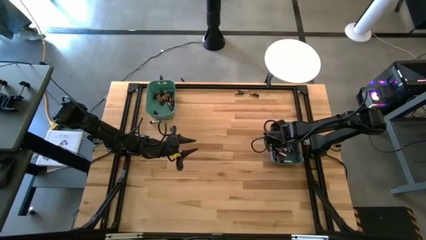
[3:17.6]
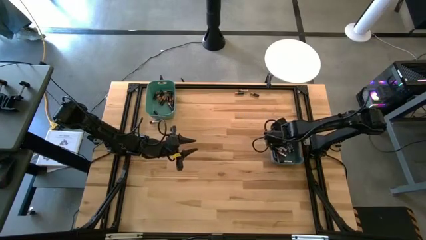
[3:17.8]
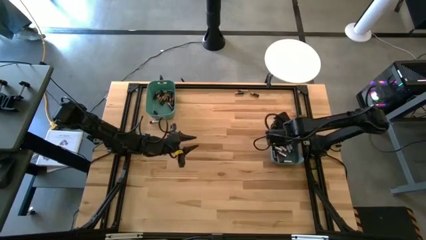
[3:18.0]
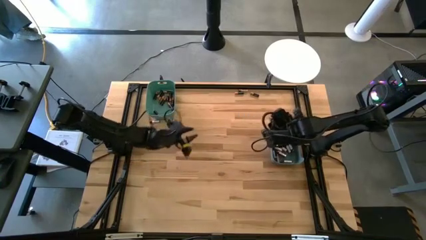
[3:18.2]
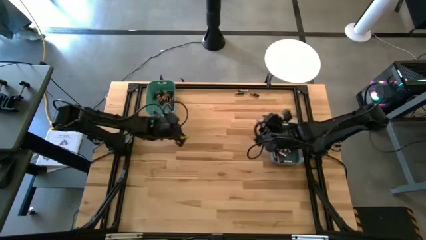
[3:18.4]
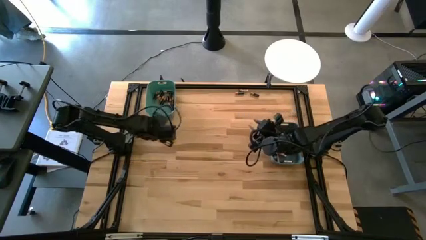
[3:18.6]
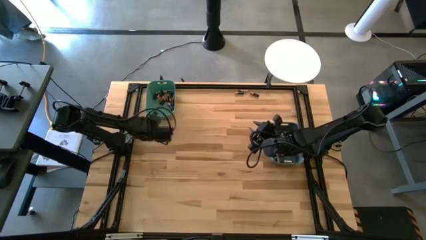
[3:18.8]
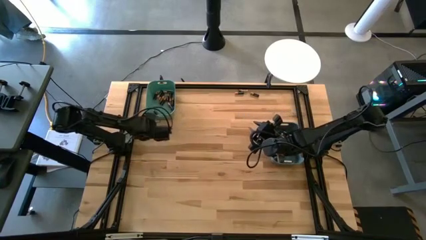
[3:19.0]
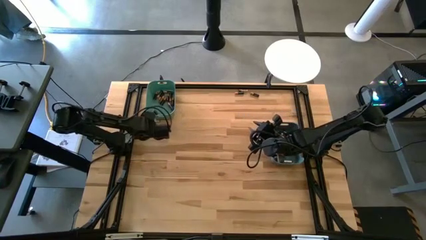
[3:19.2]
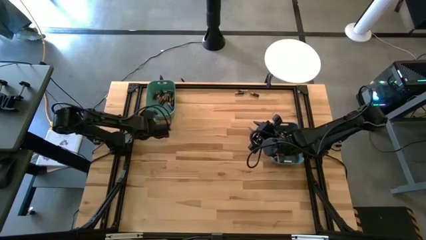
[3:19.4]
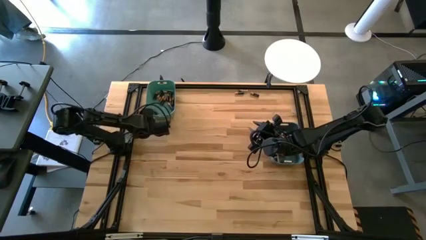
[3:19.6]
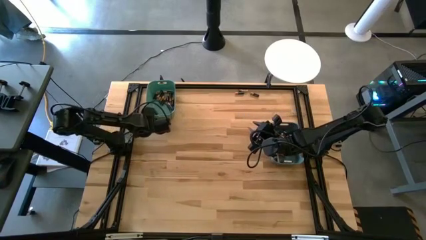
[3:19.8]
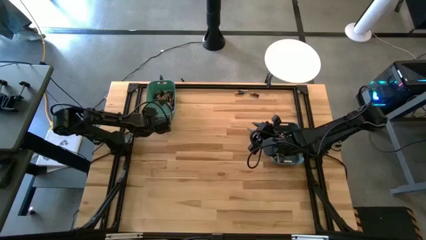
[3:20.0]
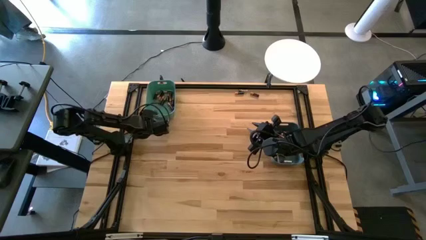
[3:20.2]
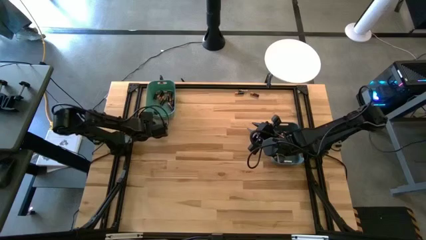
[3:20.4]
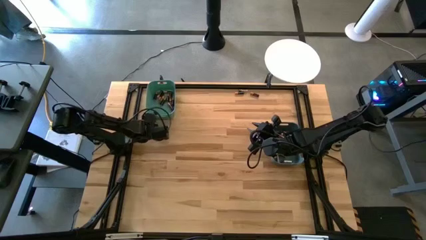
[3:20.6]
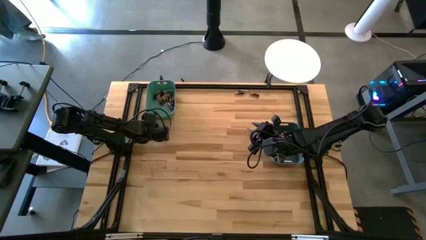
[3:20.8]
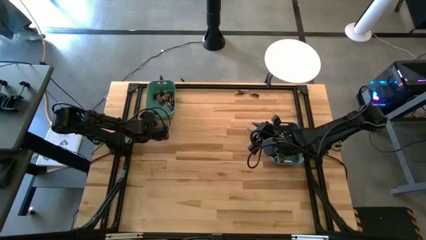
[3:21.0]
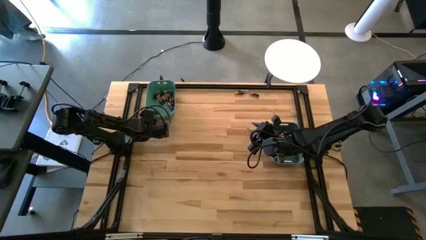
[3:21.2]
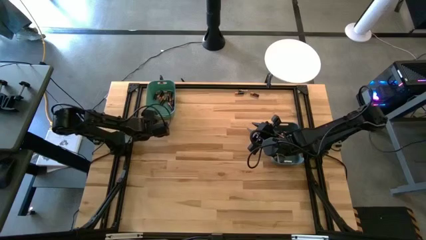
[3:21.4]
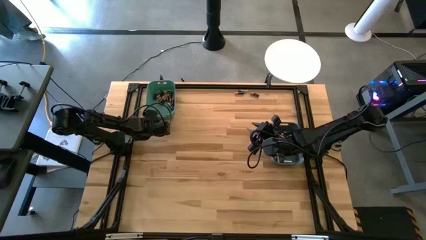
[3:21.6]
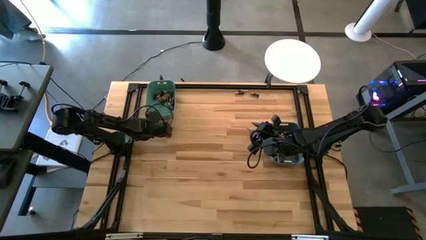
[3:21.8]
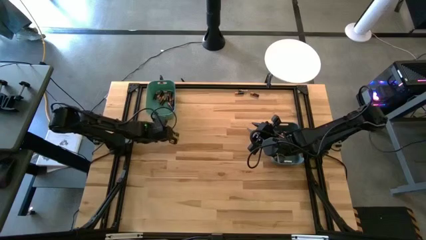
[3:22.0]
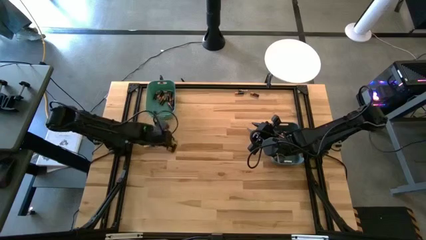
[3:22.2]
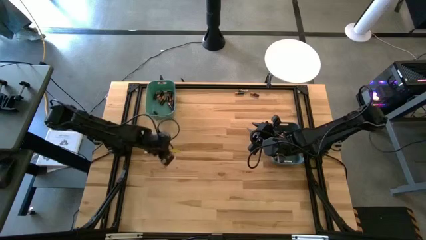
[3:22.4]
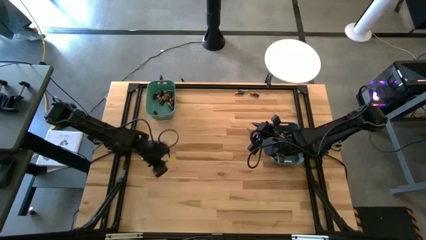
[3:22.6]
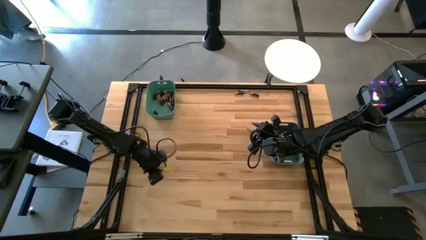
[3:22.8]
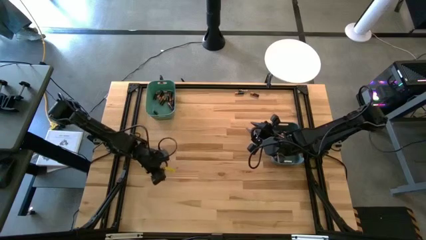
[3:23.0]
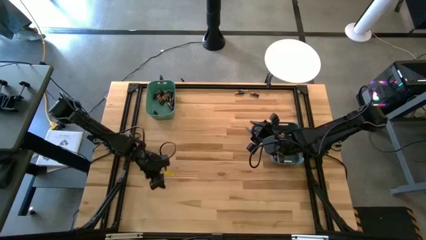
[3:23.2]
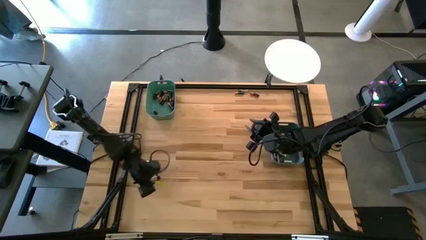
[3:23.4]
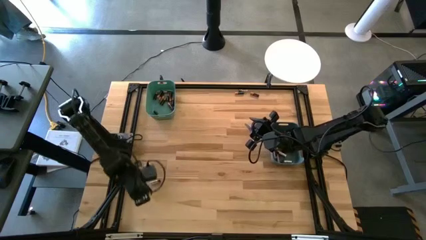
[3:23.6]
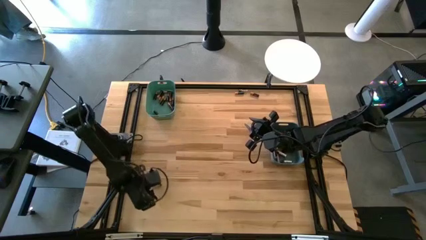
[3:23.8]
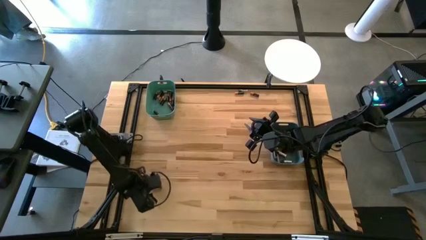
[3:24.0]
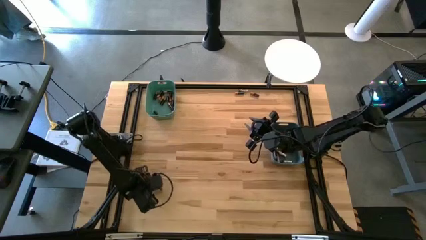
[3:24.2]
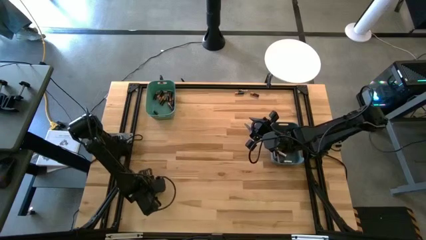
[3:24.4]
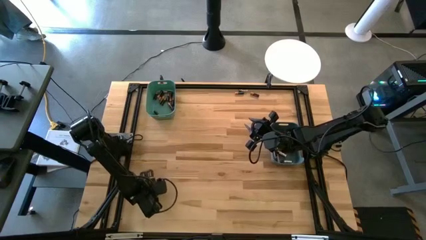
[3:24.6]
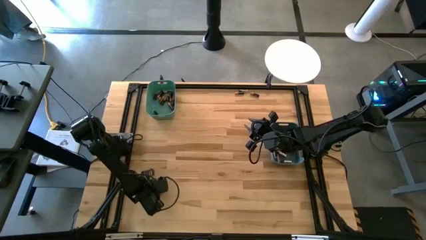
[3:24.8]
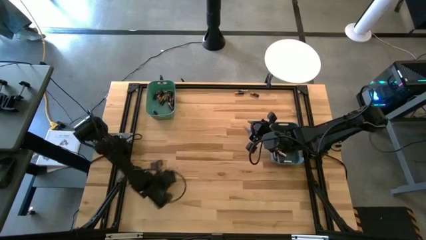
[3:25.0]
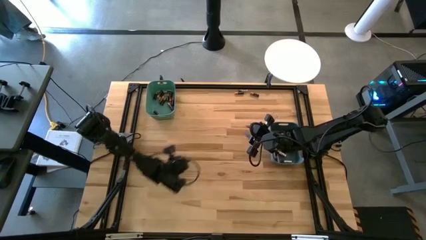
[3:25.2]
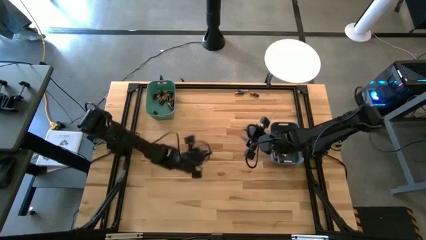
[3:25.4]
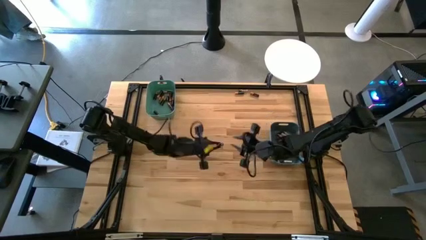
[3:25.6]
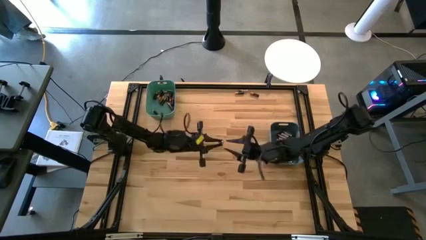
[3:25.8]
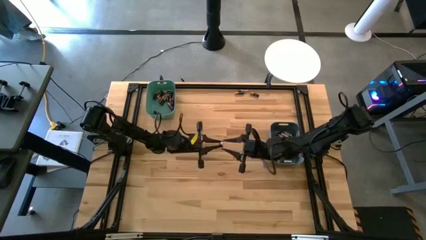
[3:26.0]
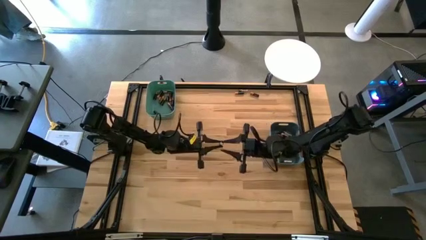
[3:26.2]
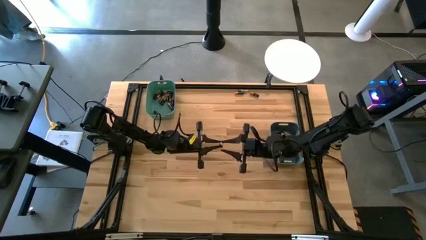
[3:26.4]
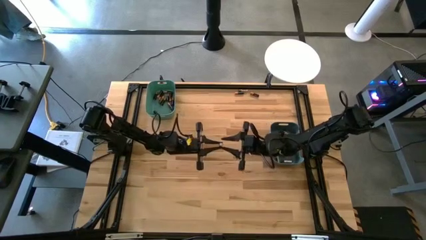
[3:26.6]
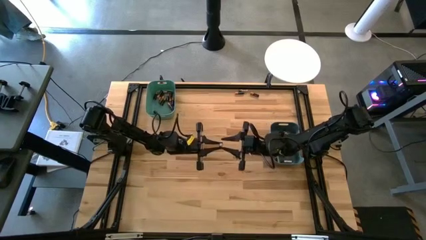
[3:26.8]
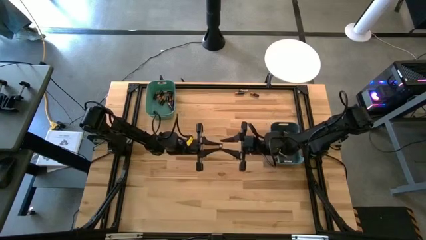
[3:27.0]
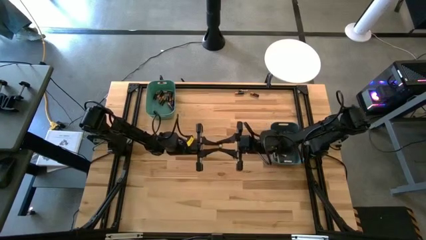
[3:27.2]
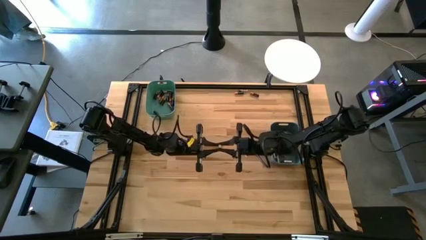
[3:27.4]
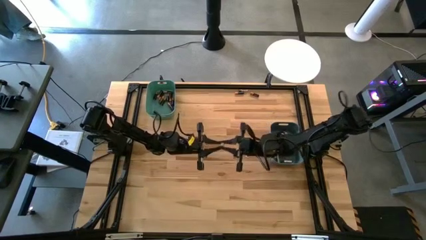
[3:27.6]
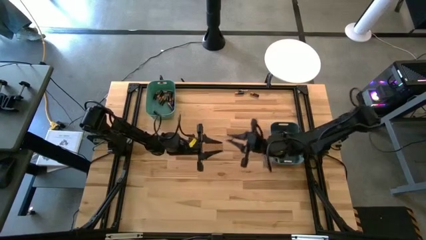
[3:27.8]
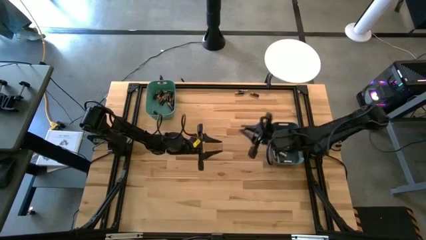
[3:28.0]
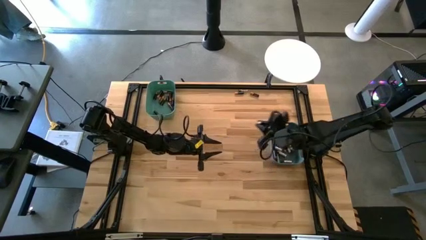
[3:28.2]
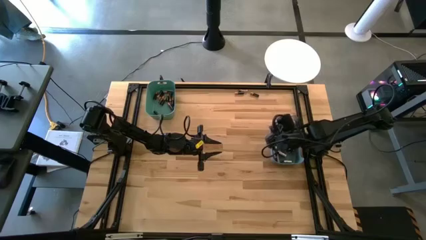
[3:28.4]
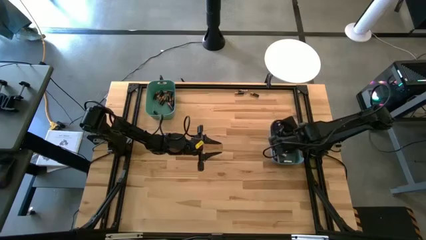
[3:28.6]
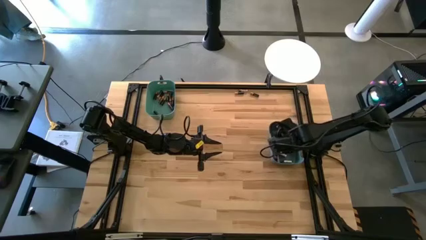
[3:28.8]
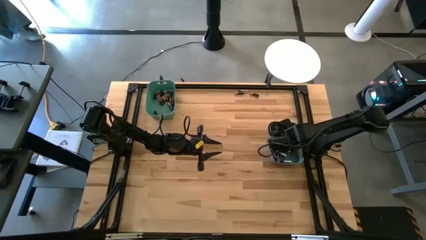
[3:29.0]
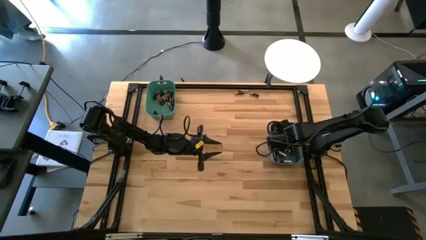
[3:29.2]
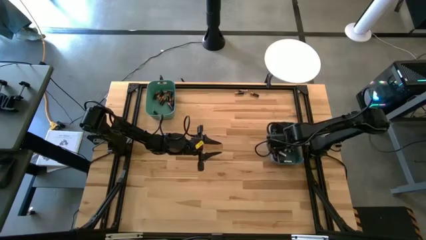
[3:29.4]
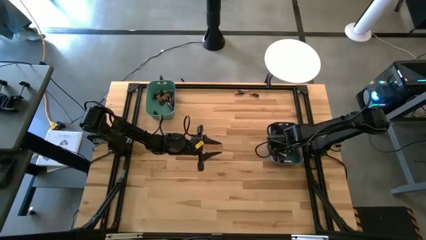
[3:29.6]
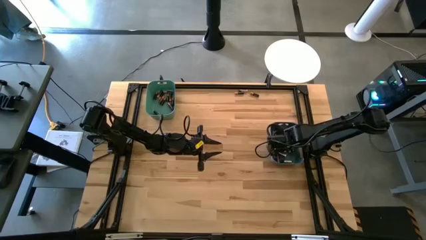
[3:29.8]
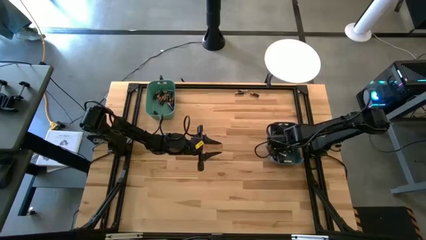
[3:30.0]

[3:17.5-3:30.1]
Task: Sort batteries
Put the silver battery into the blue bin

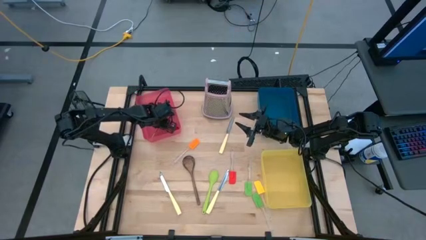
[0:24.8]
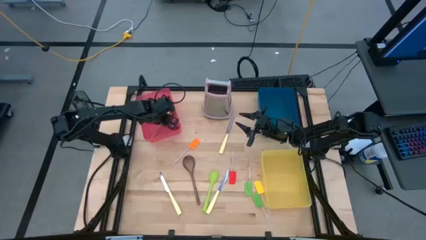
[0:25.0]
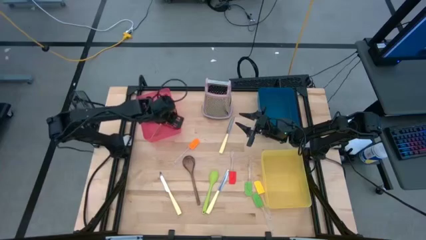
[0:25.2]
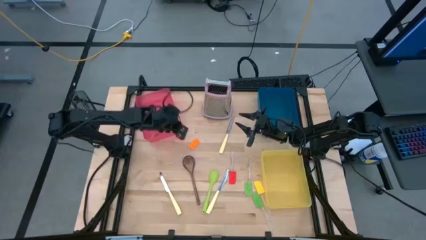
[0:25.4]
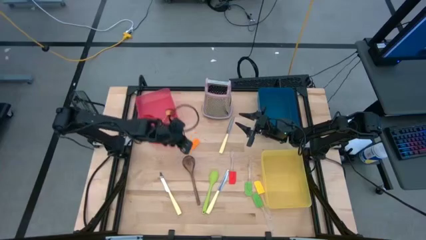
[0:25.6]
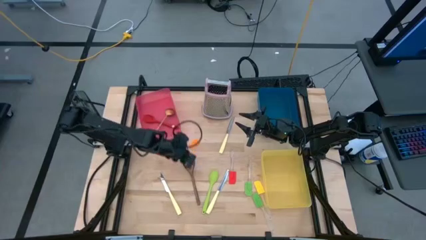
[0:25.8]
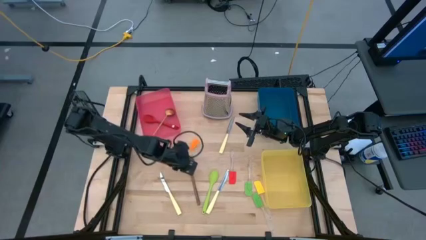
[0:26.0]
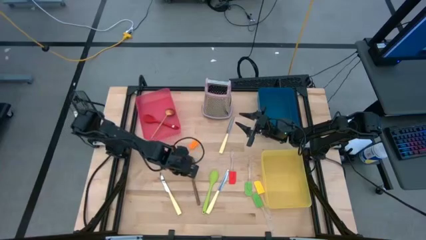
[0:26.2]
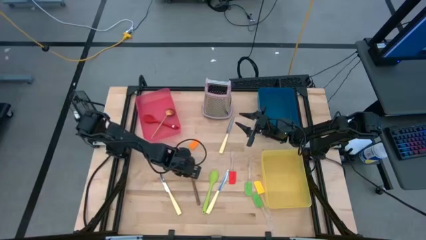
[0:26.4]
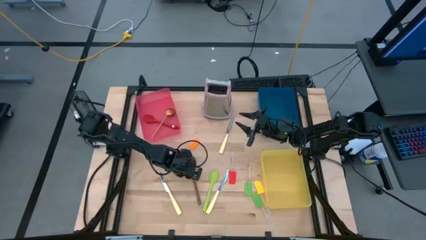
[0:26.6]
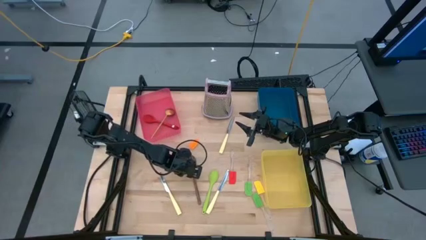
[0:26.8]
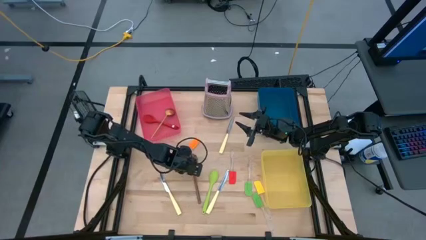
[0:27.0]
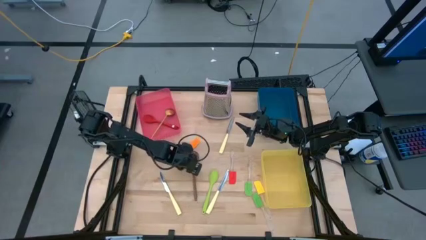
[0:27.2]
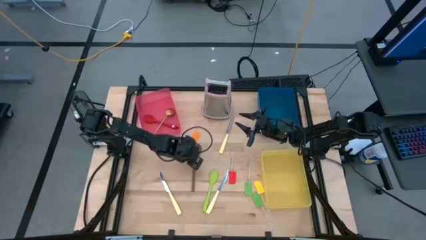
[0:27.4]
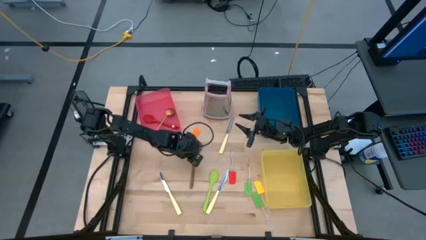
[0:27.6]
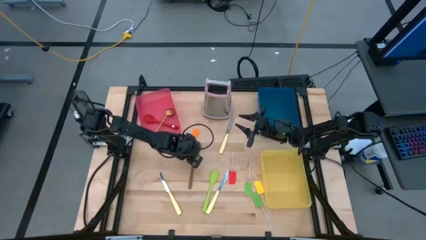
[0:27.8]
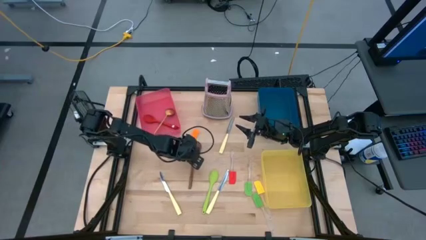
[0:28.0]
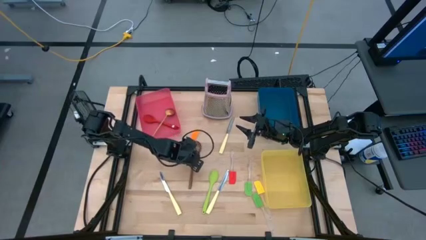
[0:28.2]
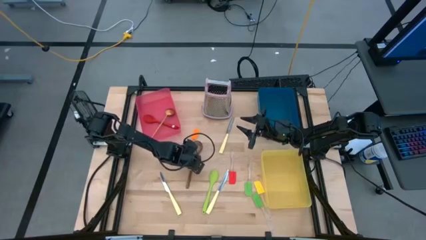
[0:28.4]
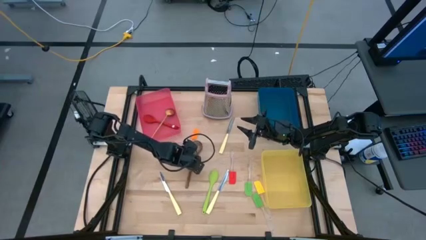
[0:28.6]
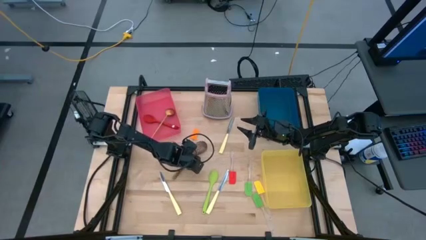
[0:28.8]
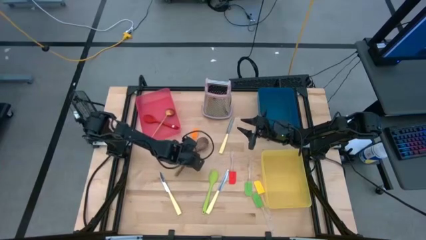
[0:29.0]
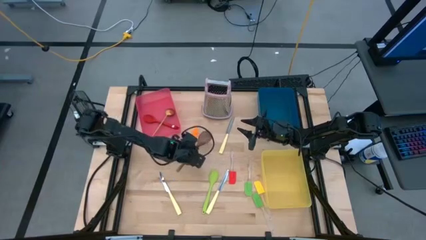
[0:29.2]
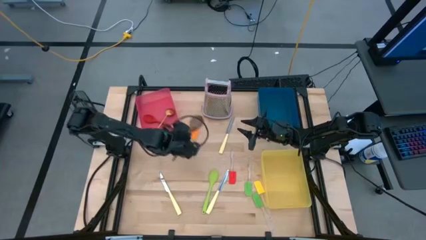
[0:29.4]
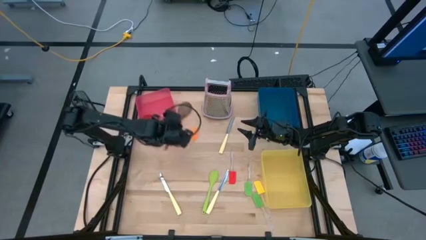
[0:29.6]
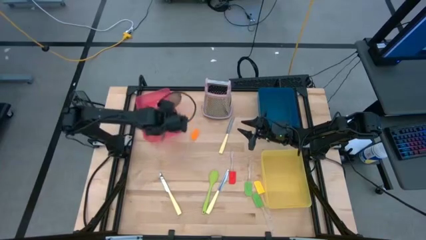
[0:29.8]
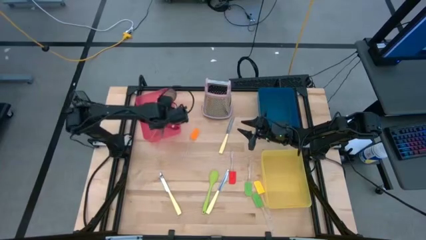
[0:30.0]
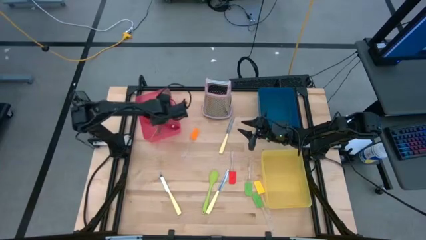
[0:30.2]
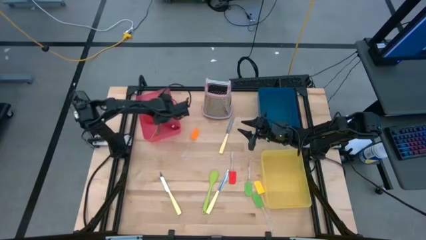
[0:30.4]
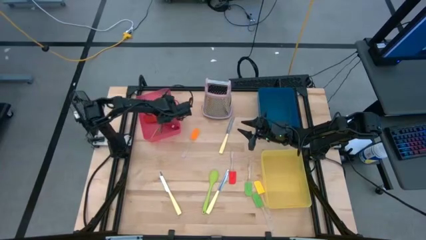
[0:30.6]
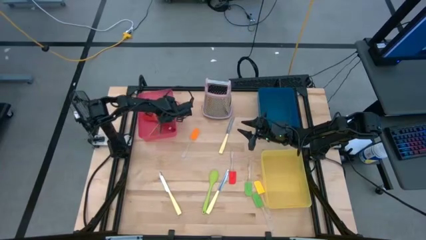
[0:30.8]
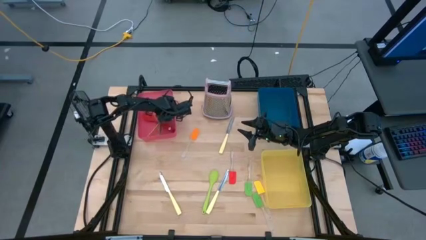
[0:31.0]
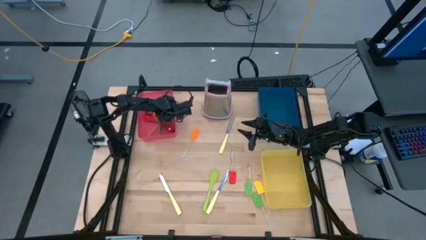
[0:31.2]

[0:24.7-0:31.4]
Task: Pick & Place Kitchen Items
Put the brown serving spoon into the pink bin
